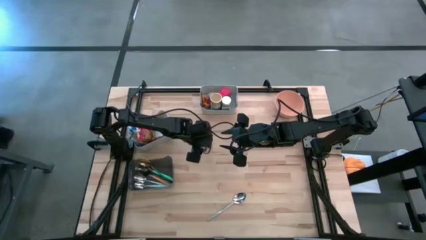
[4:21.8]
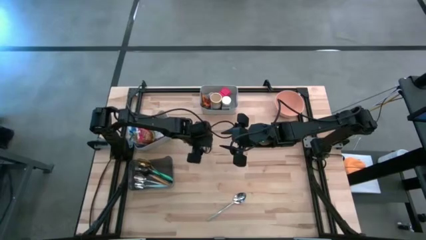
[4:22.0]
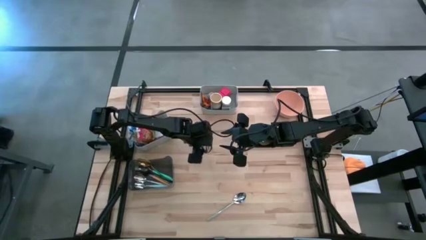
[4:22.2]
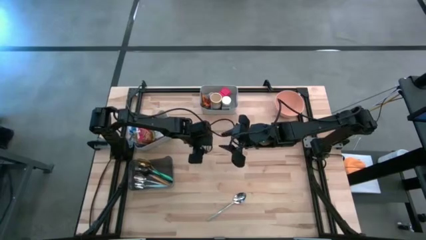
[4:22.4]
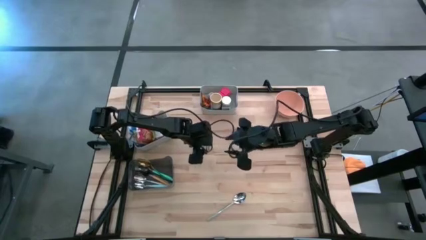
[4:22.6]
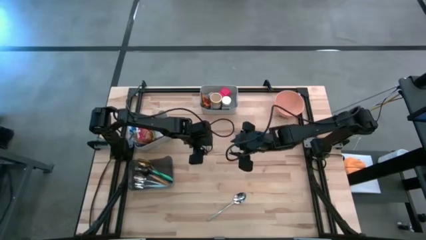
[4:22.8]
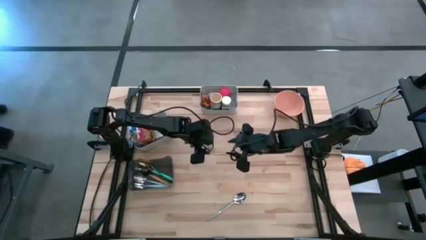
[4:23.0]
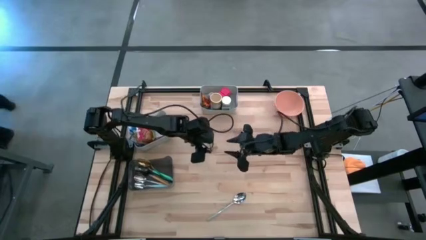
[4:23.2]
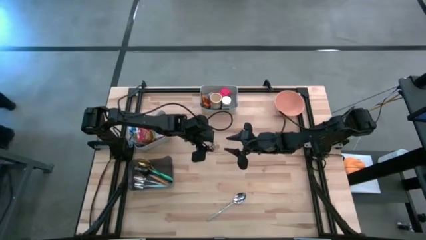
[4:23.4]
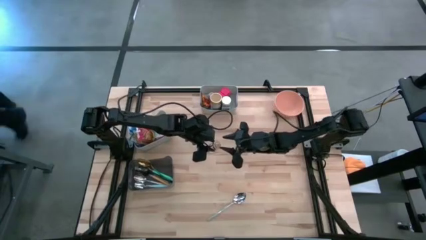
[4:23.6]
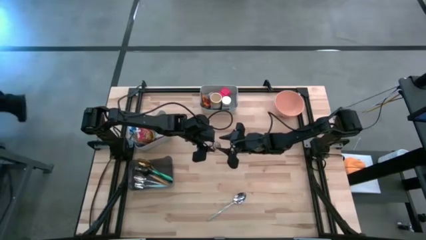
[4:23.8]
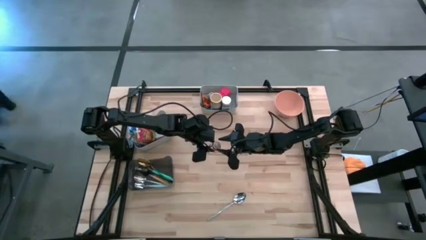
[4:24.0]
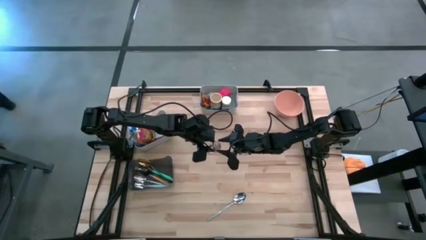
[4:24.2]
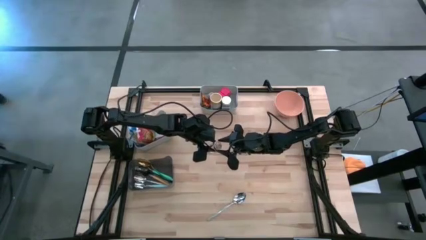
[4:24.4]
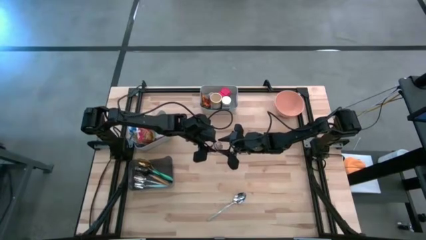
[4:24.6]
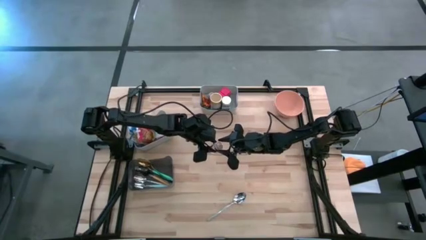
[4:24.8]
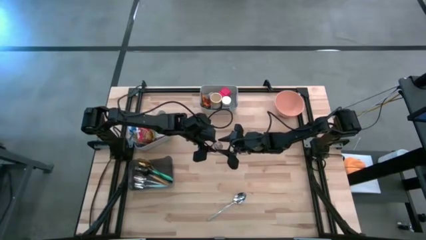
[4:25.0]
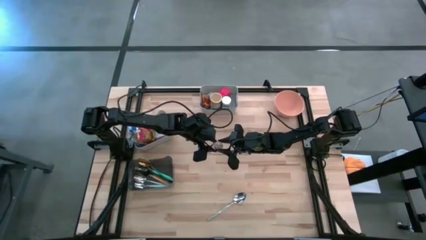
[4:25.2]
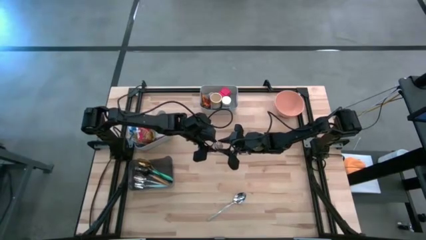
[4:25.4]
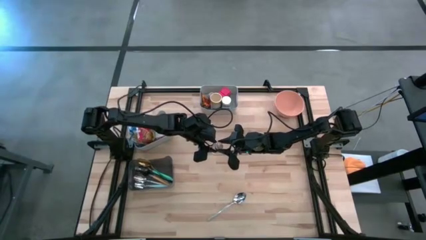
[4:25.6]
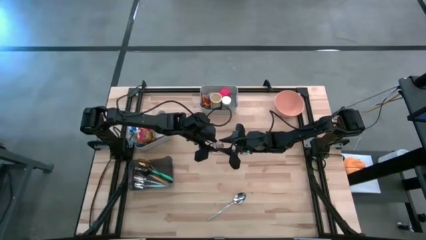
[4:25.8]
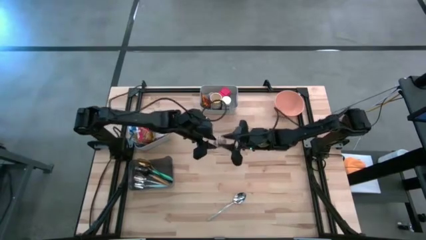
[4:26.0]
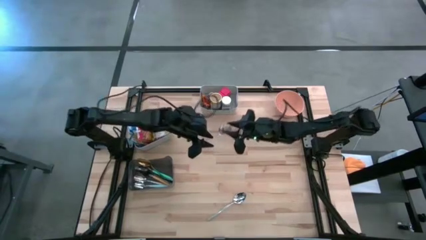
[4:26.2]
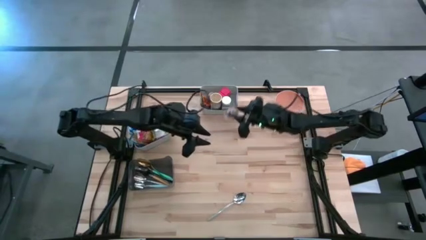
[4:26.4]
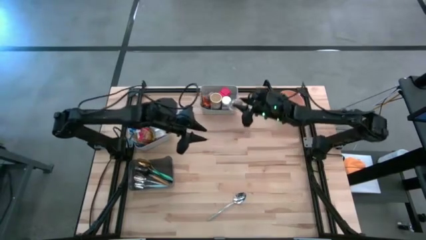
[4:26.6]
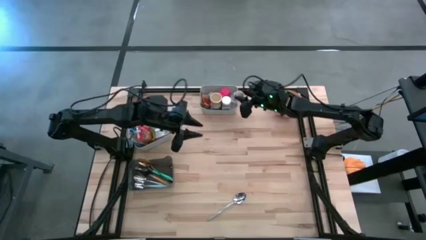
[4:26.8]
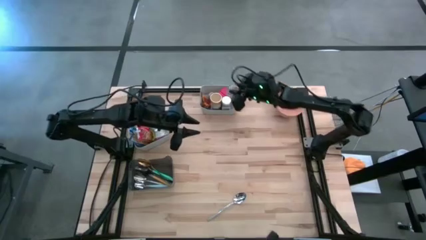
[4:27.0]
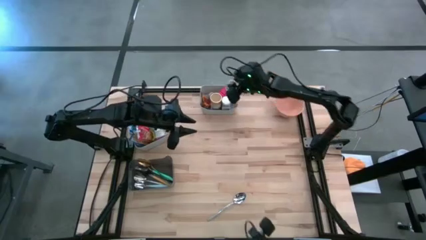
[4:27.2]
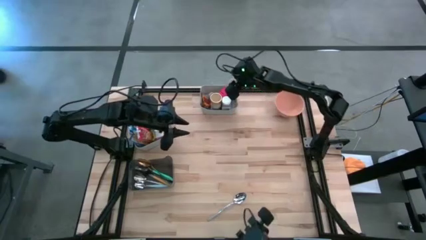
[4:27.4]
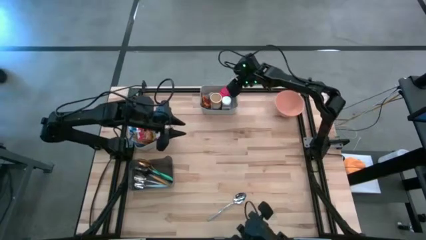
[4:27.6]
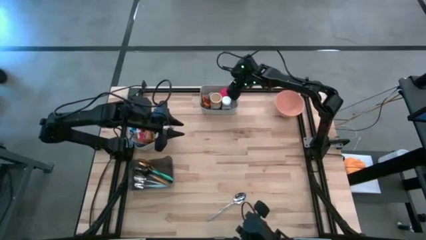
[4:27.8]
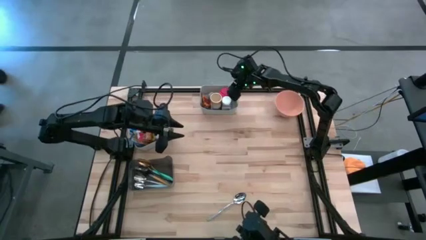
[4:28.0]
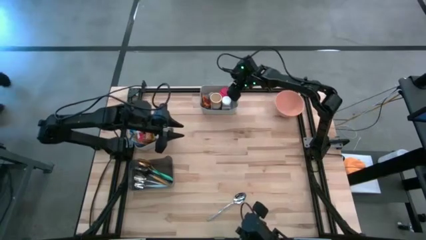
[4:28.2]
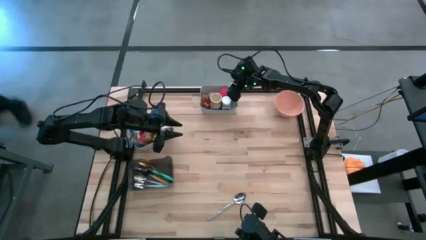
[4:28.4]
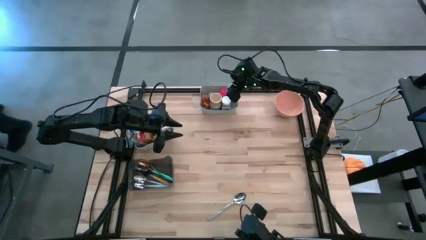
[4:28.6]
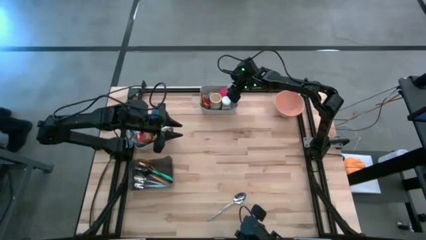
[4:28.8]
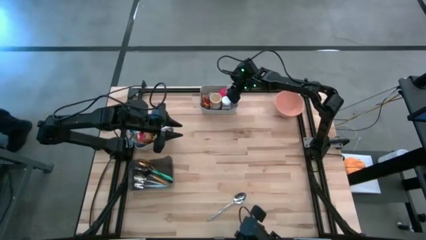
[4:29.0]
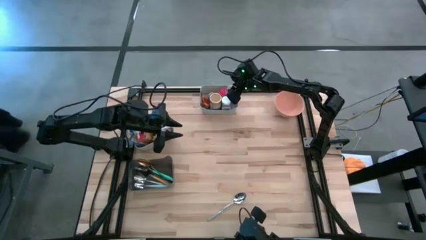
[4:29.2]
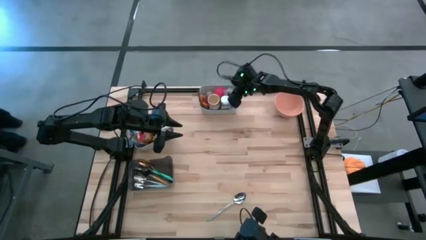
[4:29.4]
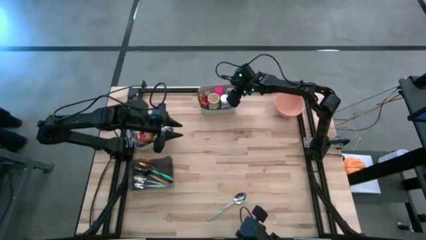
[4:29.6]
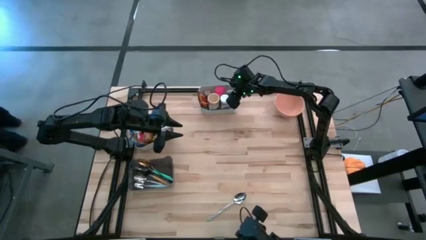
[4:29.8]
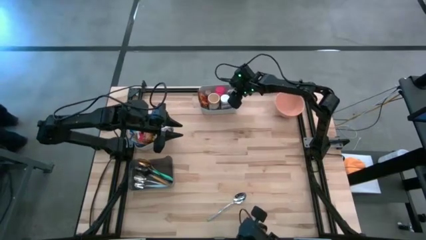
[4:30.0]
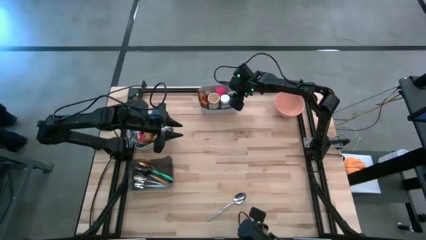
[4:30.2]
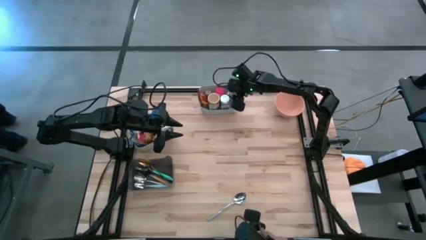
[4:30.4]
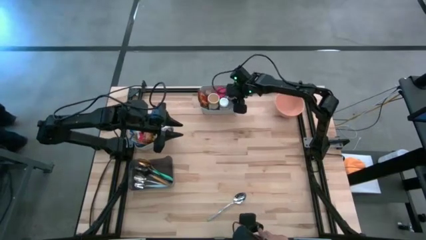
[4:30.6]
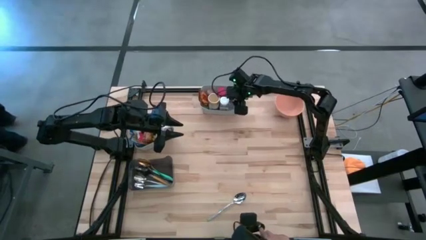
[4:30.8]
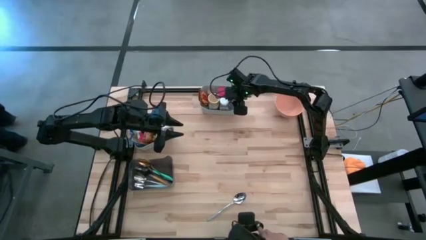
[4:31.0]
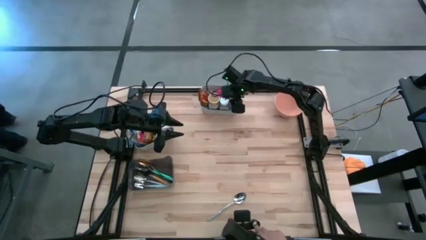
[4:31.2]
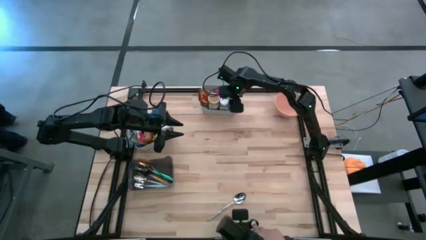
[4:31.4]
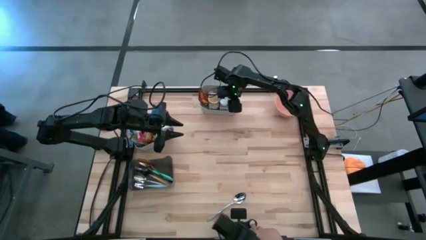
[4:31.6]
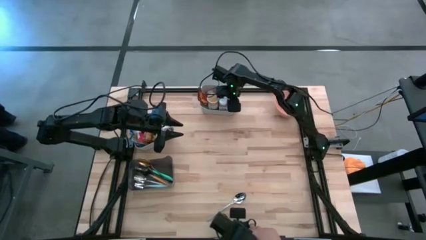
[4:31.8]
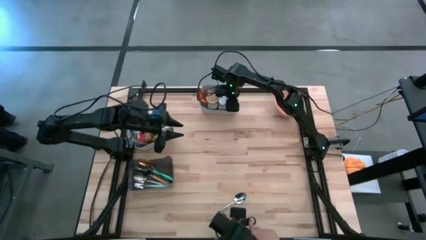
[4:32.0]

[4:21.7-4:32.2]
Put the brown spice bottle into the top gray bin
